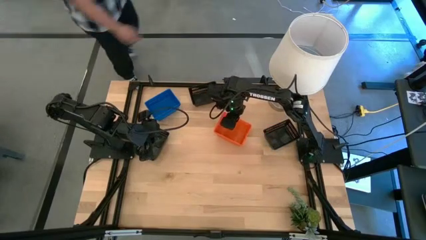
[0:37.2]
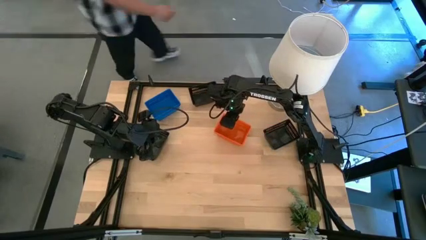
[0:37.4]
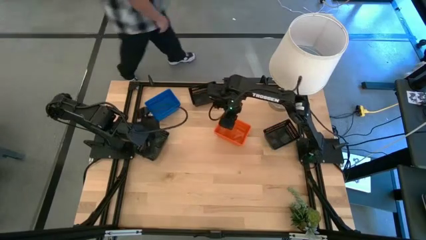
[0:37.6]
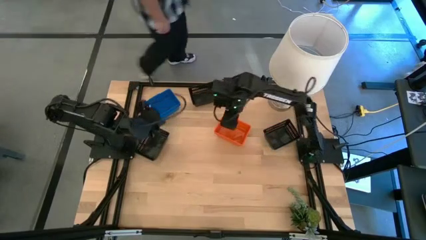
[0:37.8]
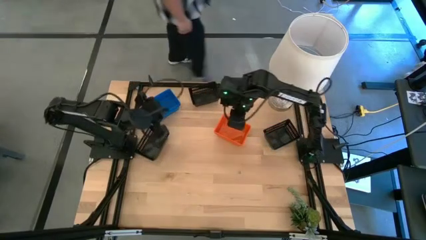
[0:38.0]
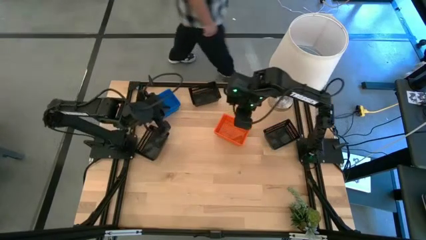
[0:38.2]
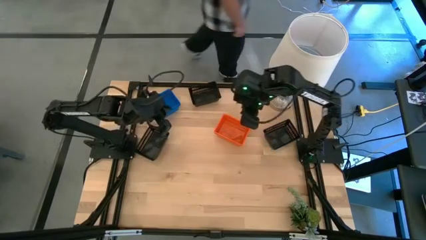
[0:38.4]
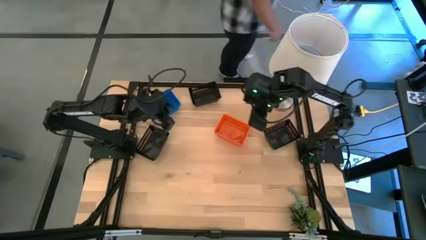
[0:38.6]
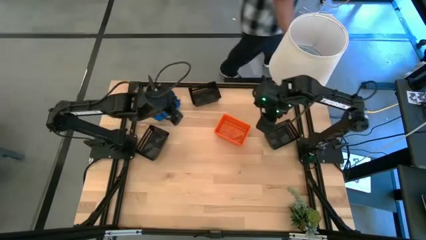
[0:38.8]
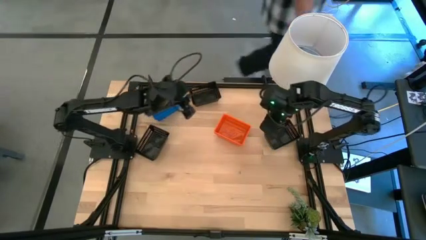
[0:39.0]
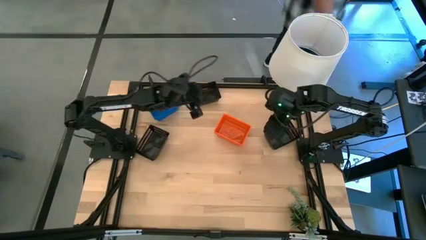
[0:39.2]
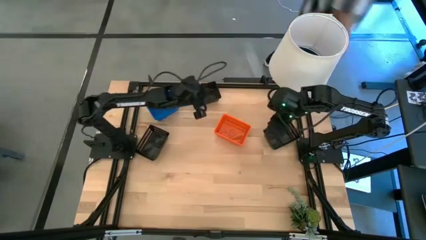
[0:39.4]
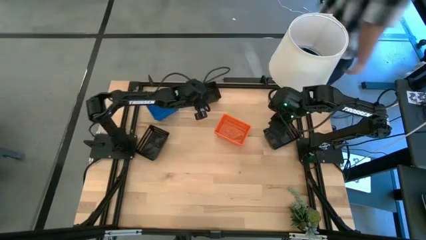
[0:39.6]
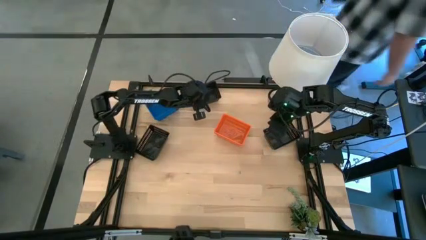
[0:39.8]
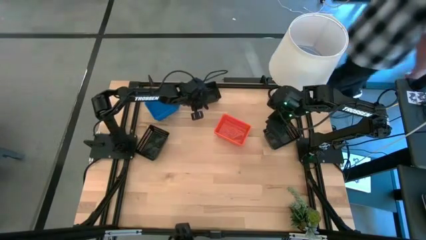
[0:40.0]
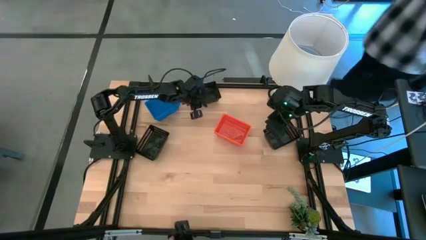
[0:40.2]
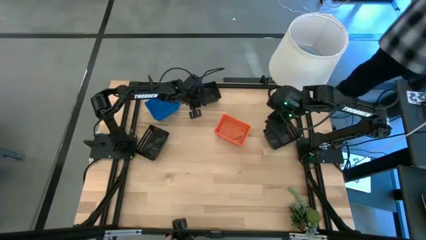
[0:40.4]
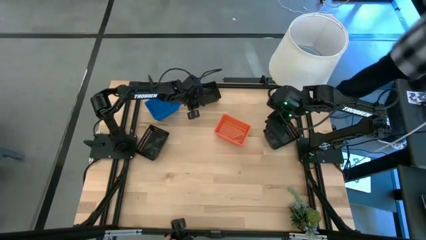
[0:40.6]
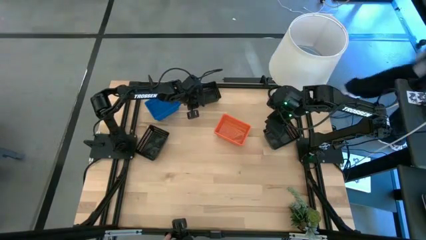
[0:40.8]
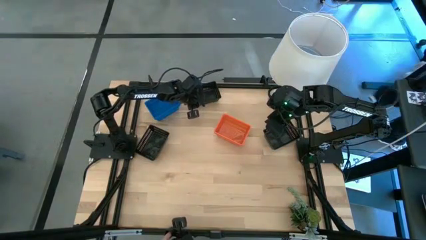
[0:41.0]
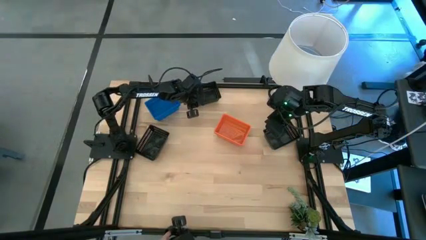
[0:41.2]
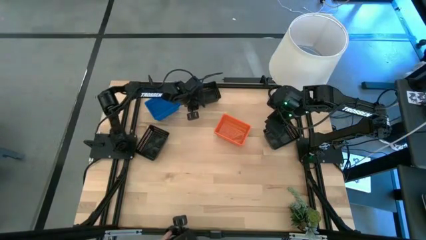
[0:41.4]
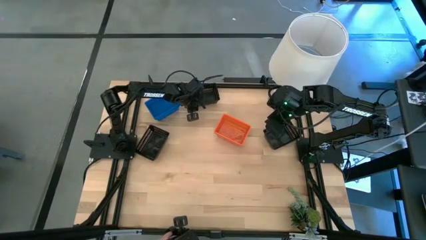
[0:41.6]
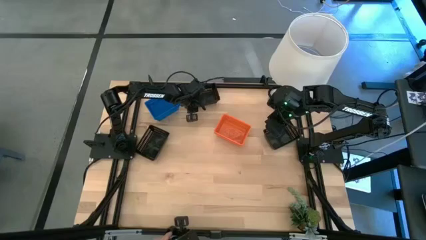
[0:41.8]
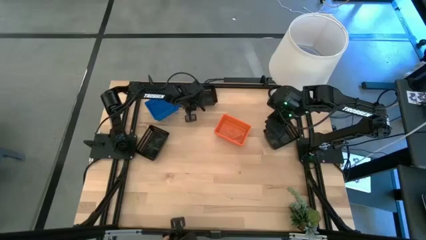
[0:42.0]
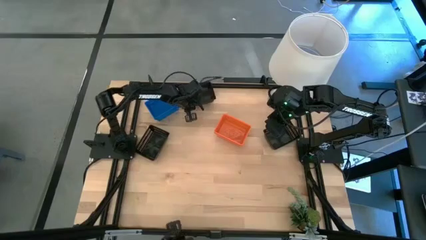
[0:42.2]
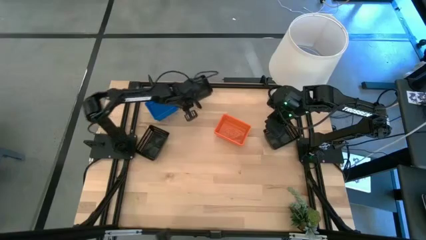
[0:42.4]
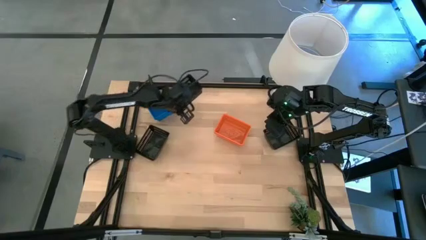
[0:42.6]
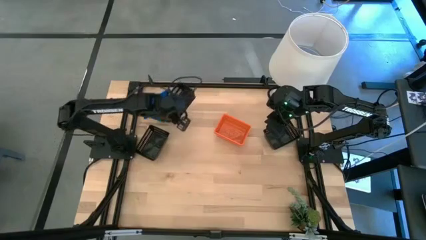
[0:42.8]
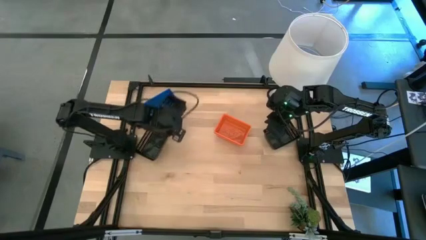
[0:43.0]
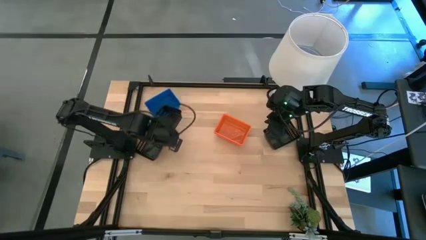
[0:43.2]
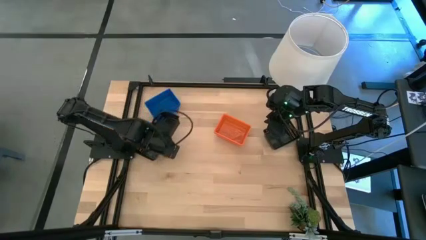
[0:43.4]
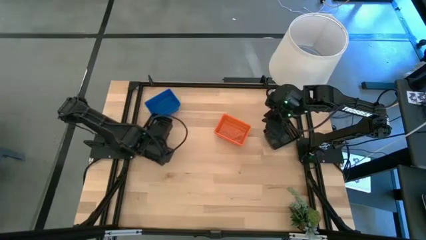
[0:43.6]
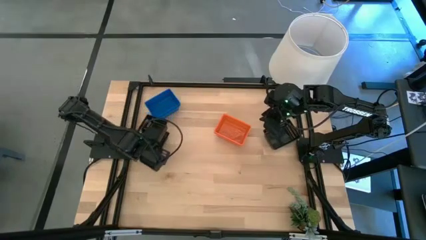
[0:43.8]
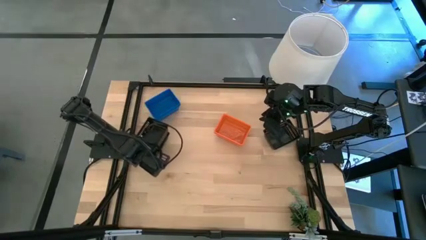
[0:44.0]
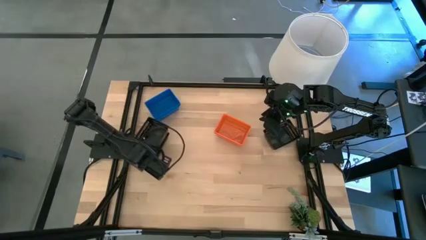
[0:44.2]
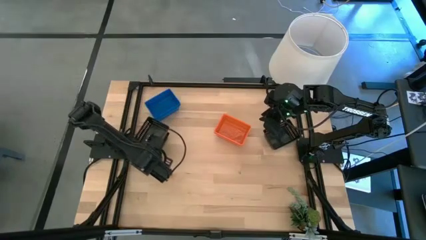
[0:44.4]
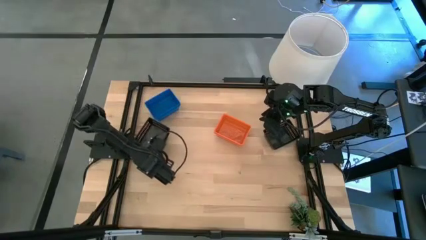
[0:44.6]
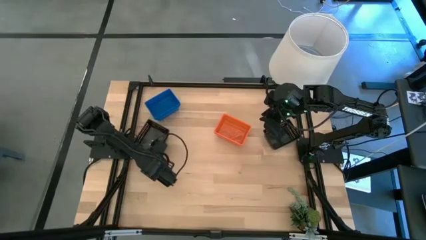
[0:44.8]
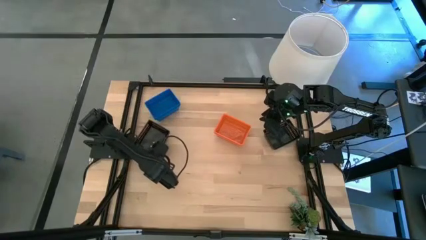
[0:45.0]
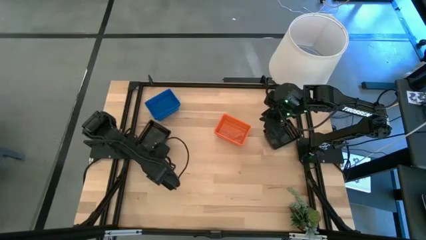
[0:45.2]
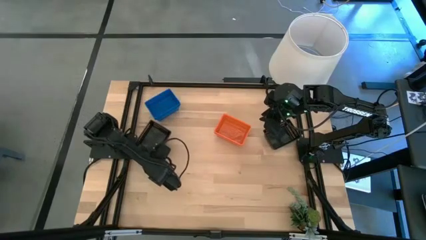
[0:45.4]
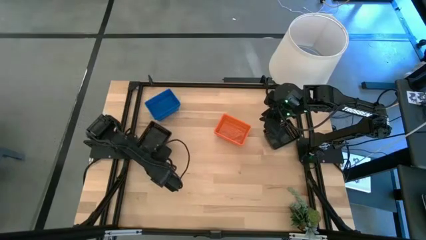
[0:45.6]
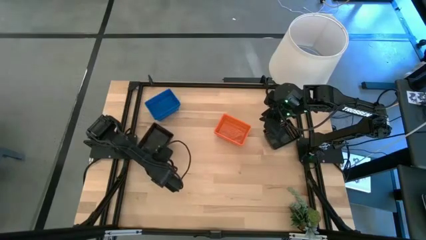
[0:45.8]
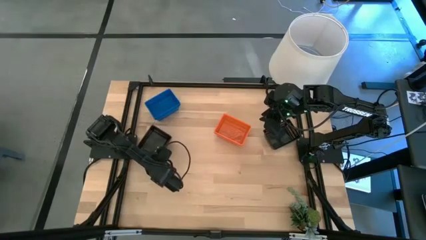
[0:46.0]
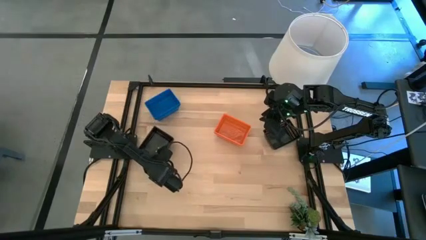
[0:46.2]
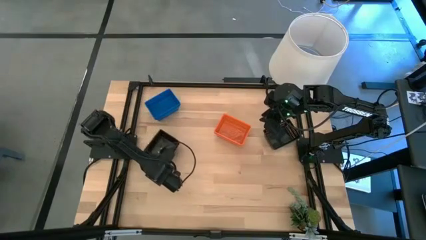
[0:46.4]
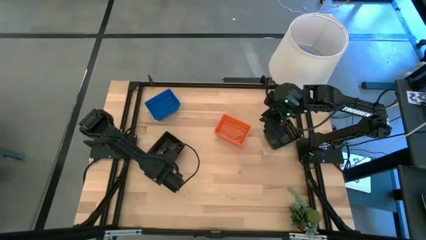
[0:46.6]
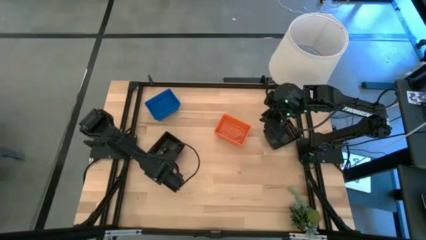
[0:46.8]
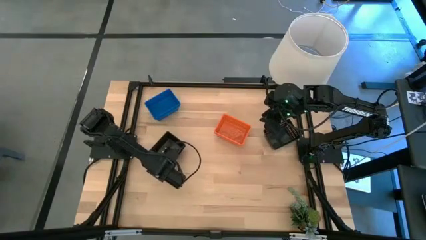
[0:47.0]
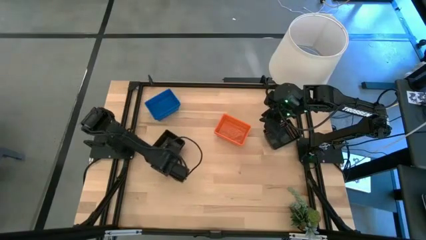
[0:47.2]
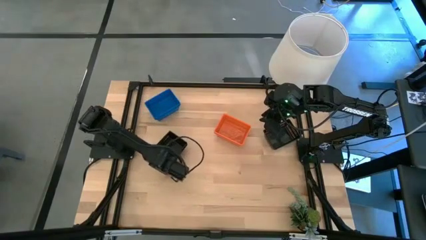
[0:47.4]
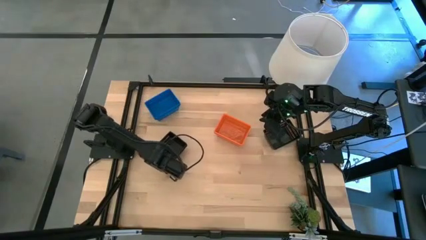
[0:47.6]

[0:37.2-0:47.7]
Stack the top black bin on top of the bottom left black bin

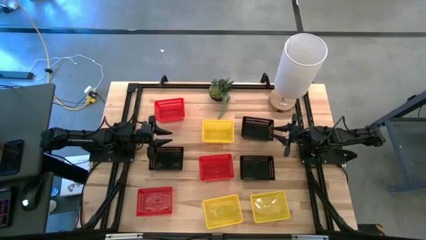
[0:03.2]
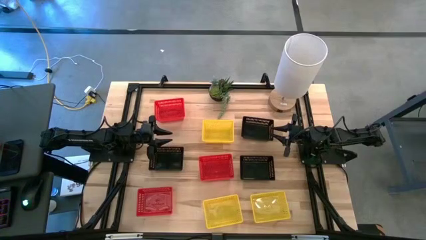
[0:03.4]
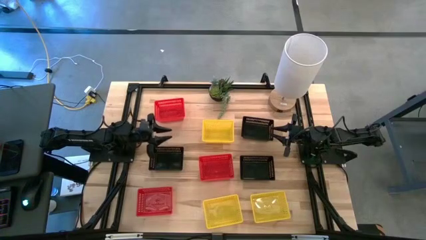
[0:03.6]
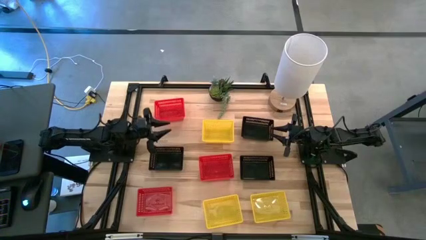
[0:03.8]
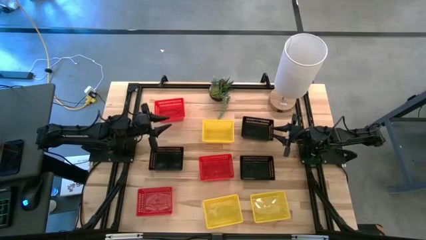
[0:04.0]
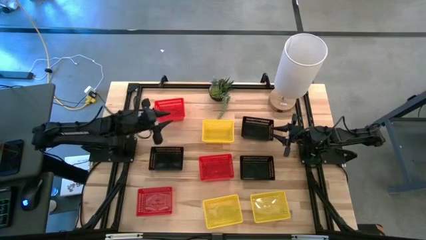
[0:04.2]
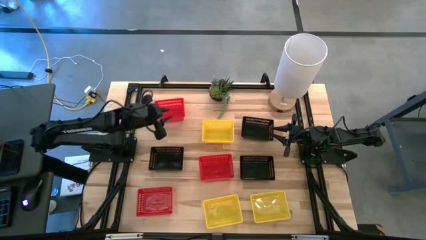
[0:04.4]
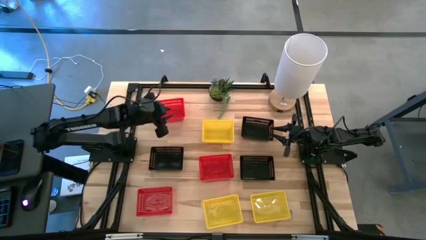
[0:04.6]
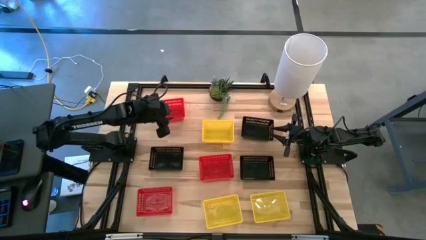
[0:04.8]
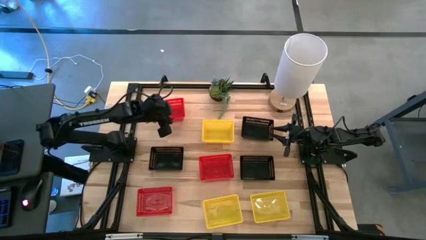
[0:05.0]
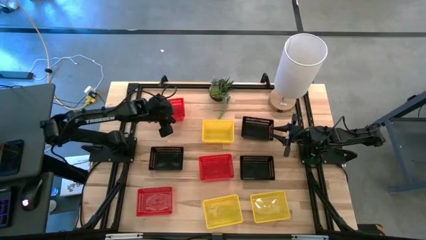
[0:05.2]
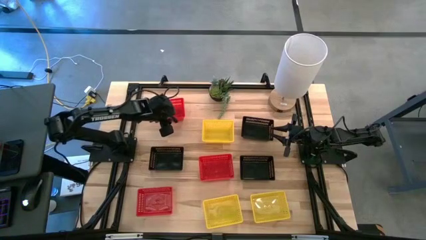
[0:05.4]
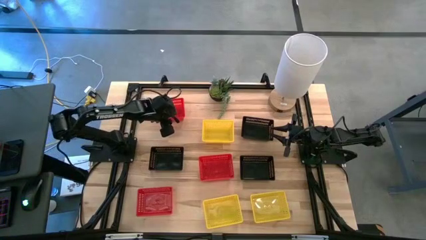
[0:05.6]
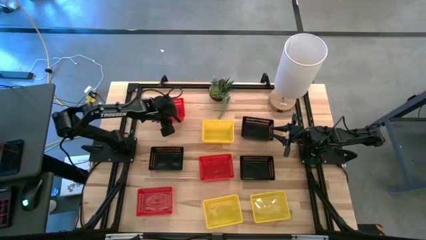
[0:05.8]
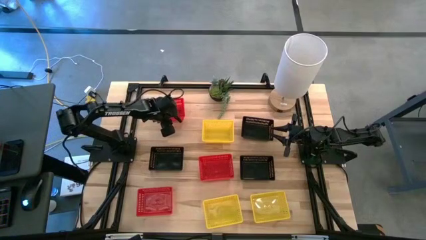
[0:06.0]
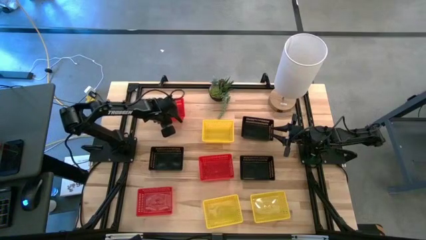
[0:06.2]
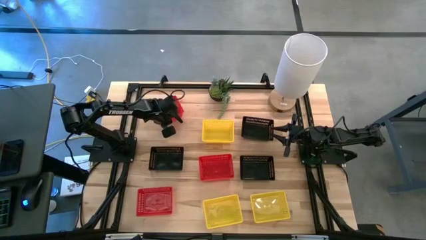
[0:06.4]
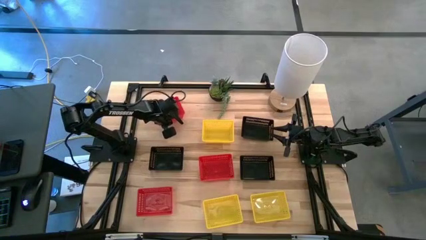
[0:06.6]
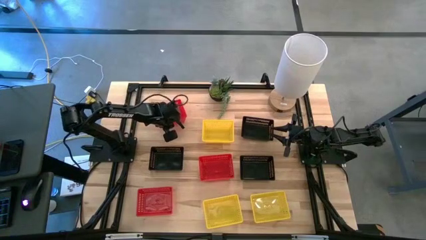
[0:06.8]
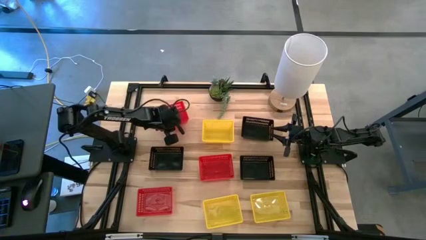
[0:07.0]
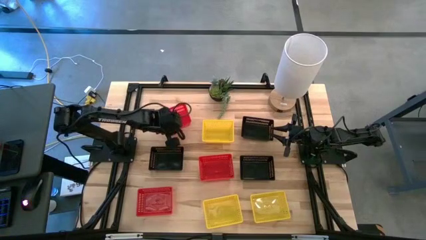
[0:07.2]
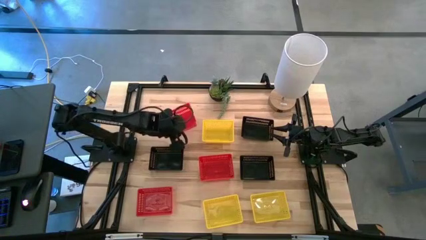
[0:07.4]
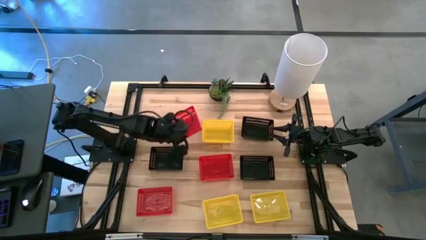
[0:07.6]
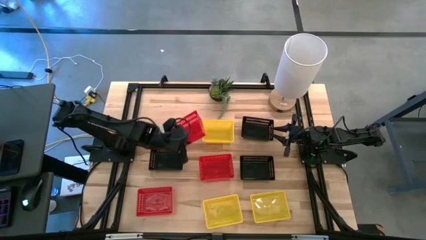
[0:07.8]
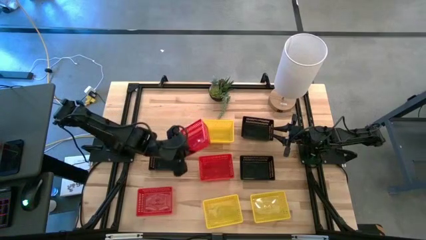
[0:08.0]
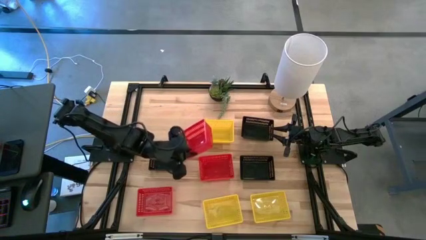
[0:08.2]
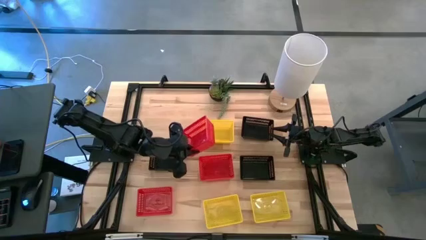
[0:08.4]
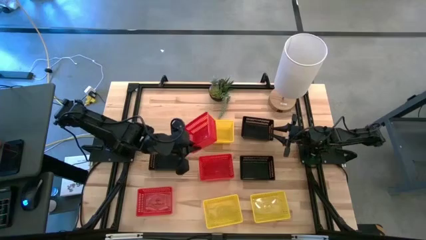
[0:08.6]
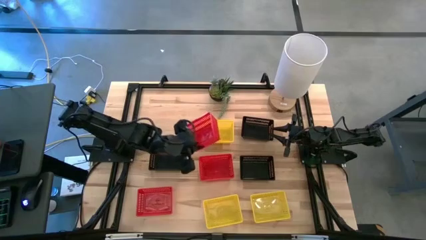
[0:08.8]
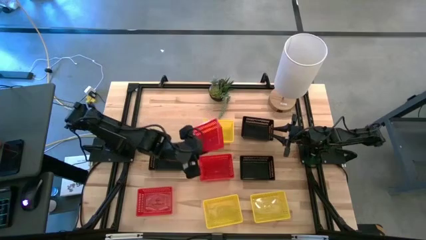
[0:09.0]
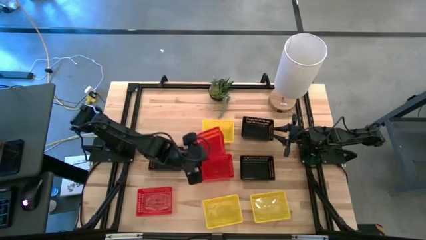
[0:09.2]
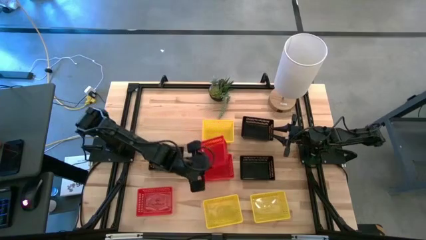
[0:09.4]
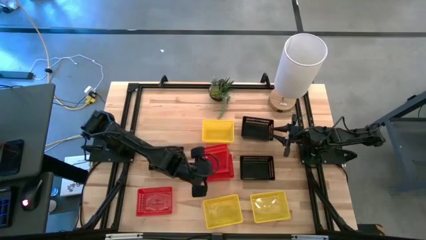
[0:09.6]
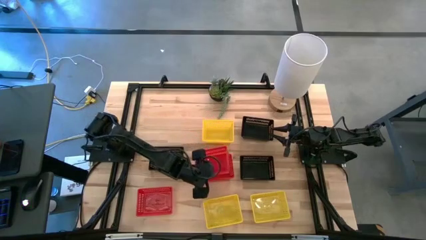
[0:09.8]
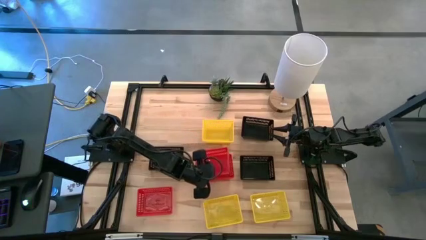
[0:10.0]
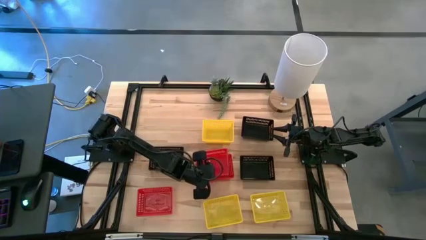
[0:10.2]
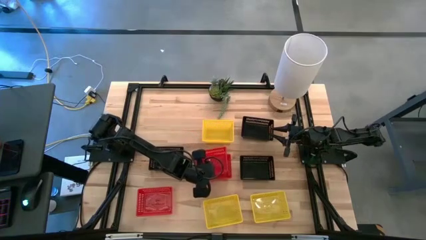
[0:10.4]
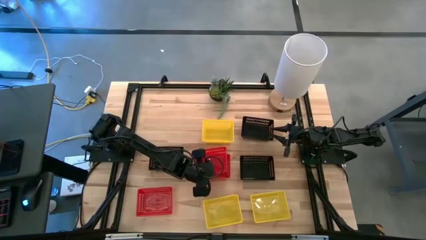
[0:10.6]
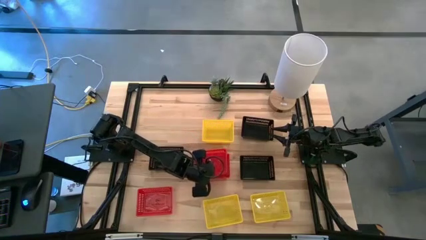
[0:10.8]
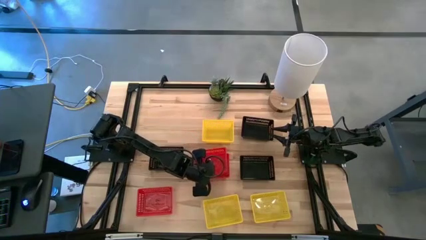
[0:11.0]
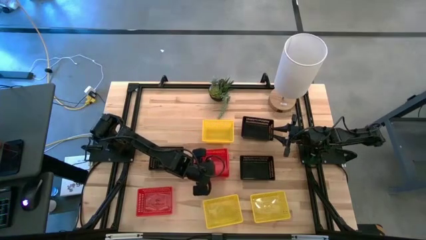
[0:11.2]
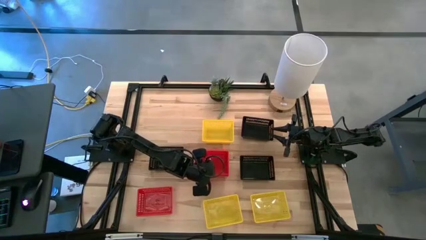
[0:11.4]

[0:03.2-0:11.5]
Stack the top red bin on the middle red bin
